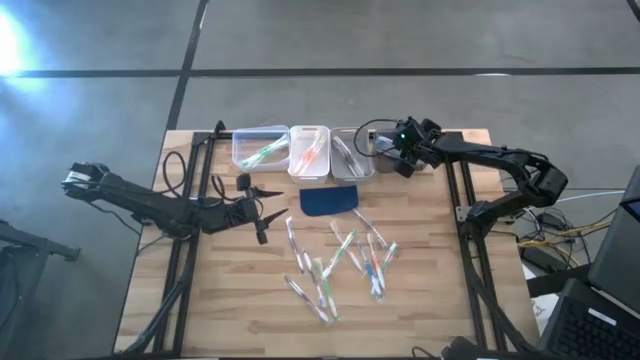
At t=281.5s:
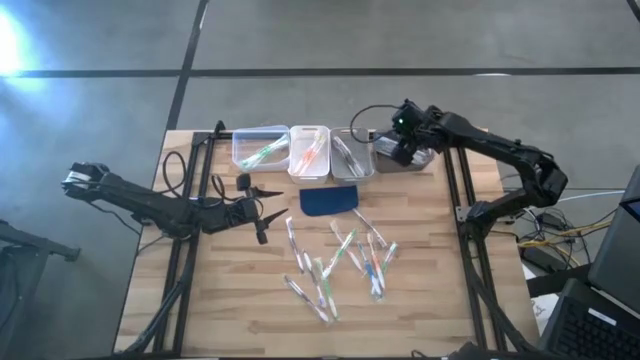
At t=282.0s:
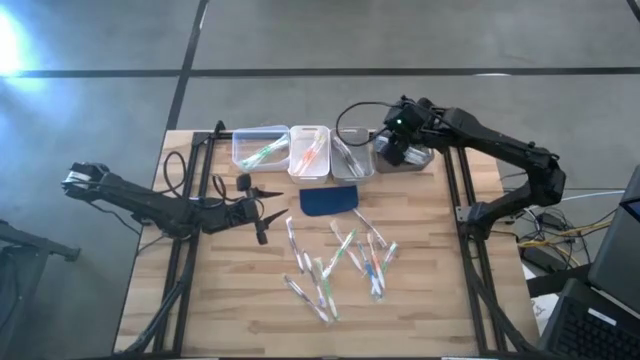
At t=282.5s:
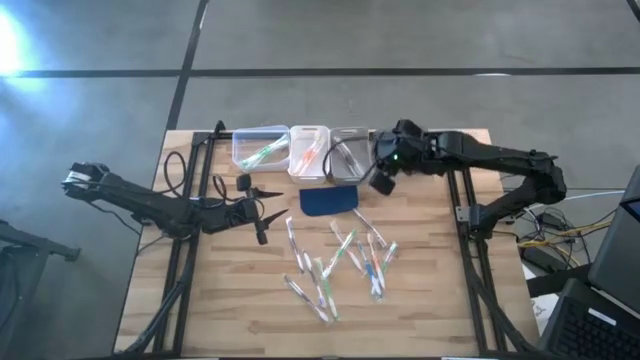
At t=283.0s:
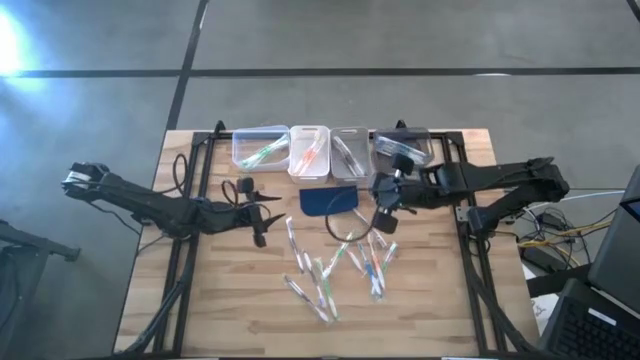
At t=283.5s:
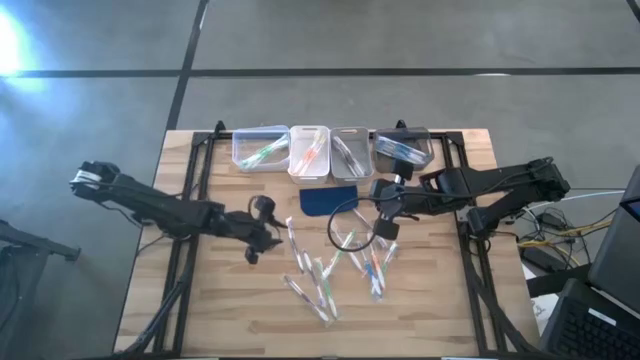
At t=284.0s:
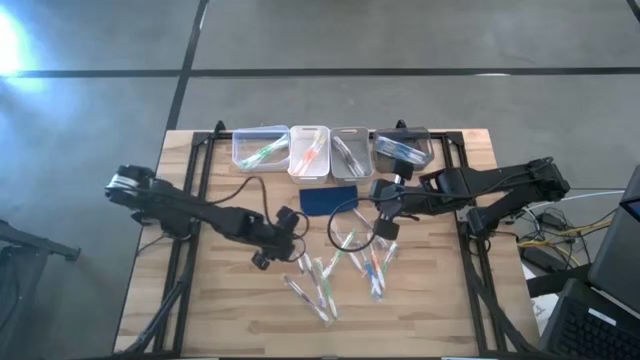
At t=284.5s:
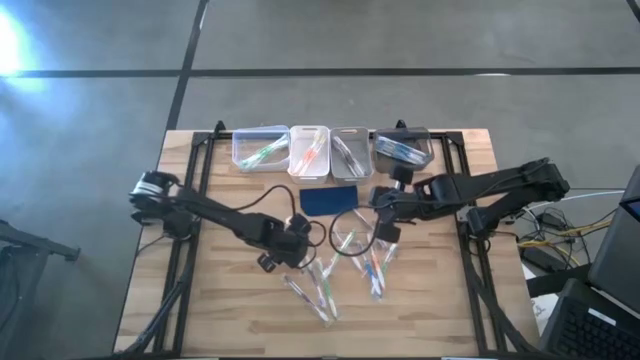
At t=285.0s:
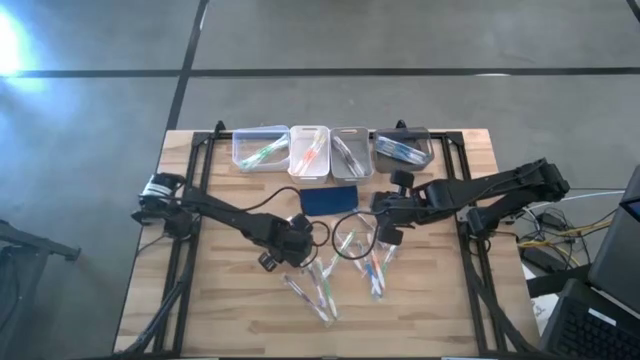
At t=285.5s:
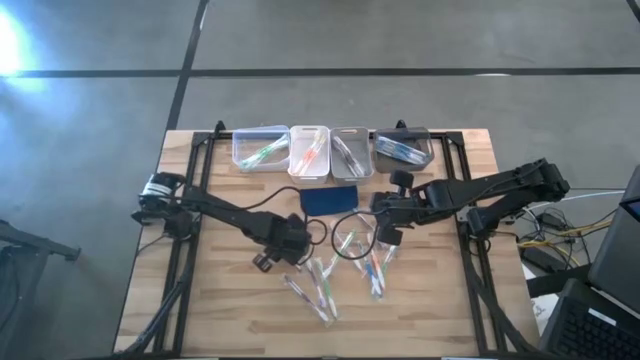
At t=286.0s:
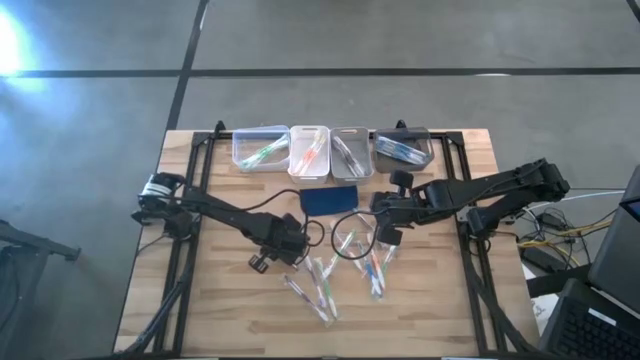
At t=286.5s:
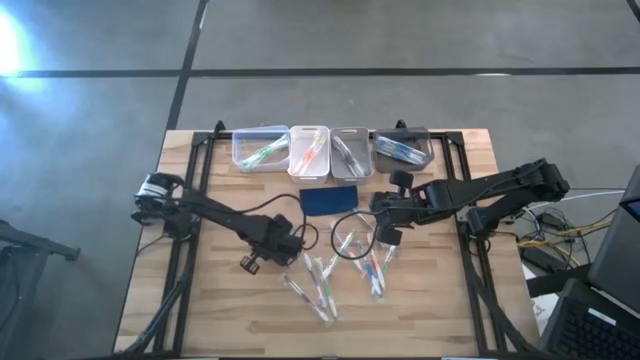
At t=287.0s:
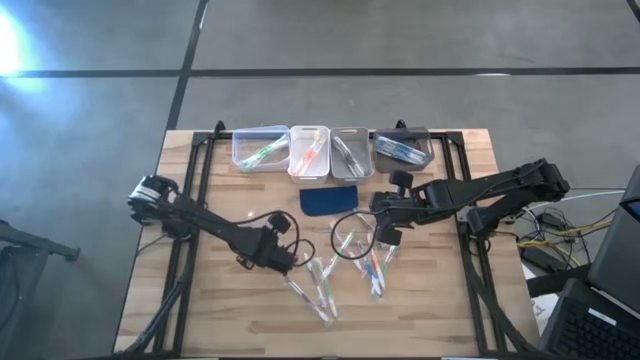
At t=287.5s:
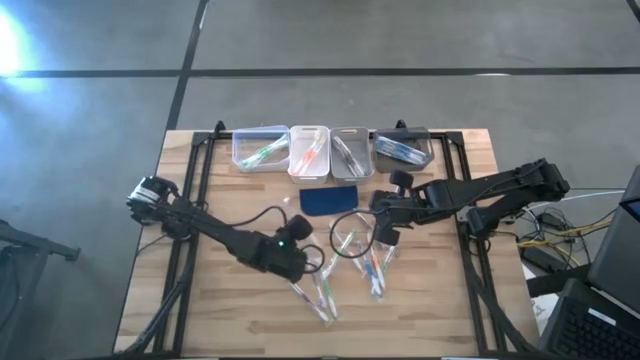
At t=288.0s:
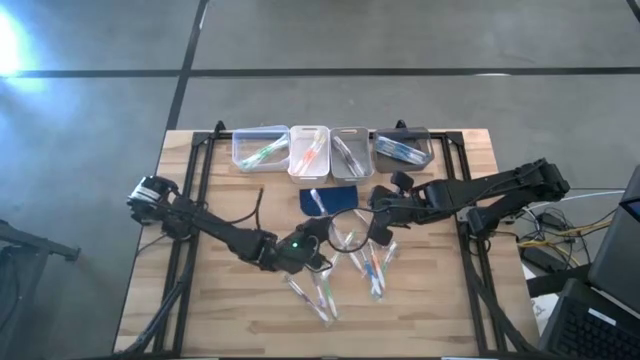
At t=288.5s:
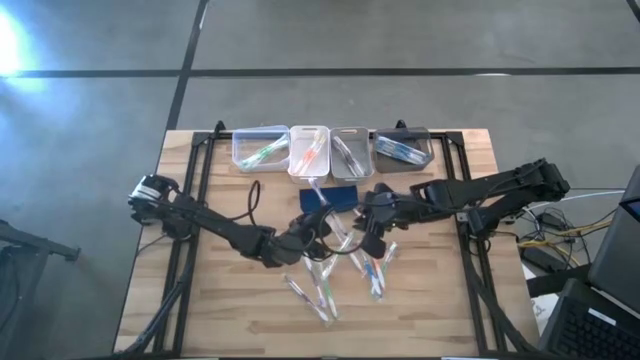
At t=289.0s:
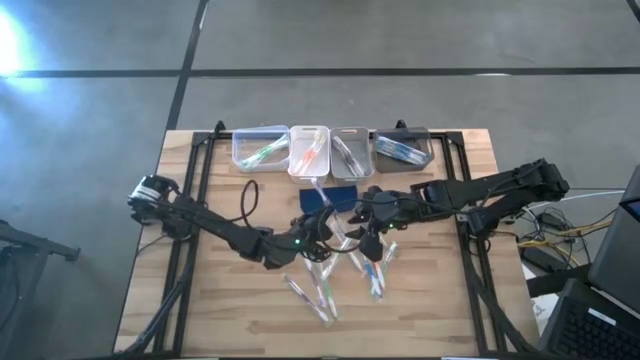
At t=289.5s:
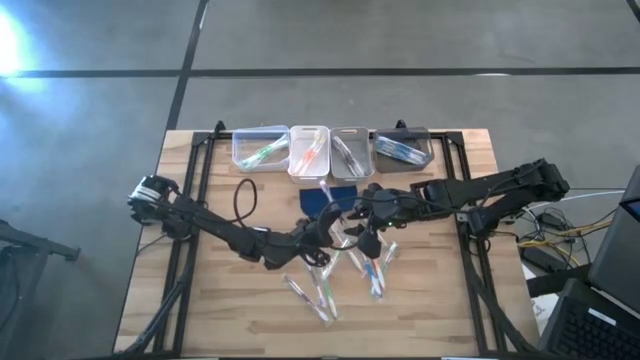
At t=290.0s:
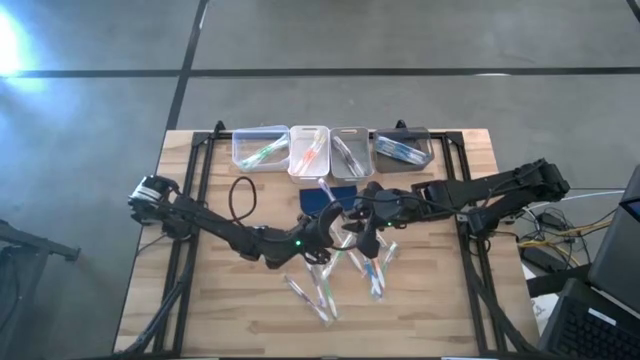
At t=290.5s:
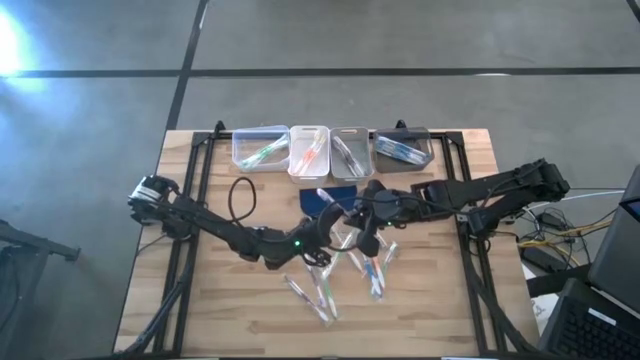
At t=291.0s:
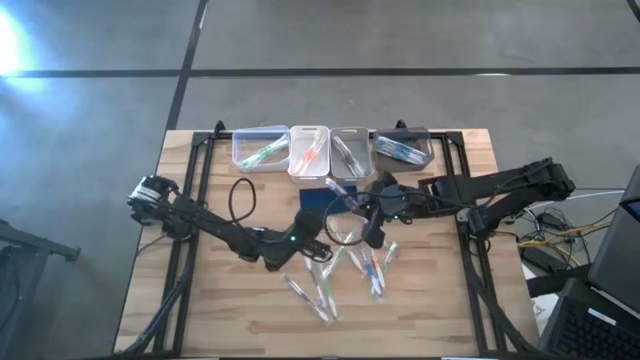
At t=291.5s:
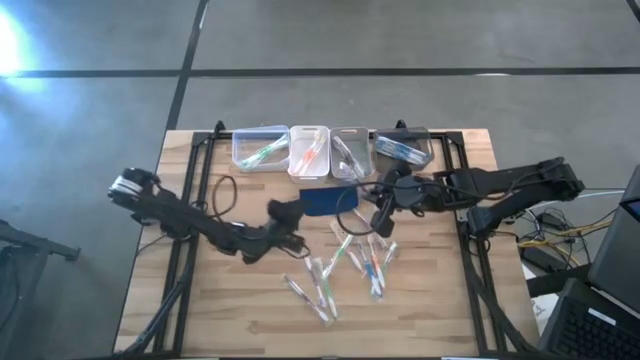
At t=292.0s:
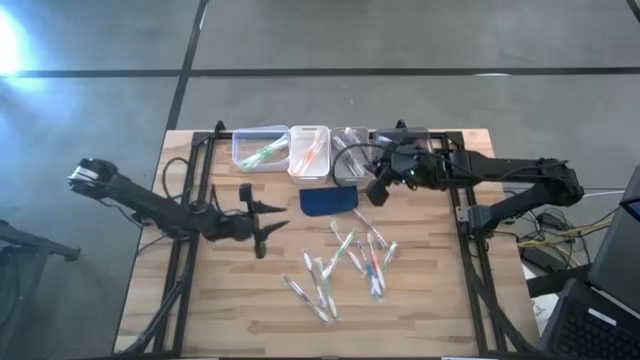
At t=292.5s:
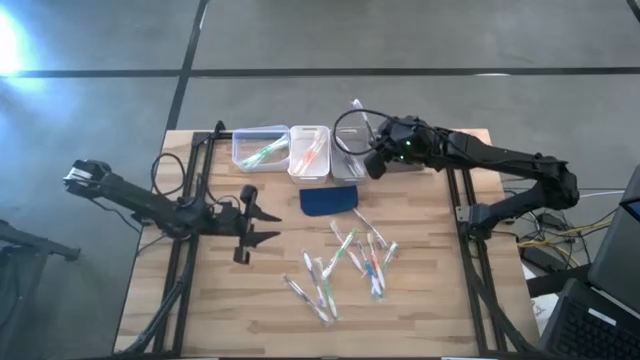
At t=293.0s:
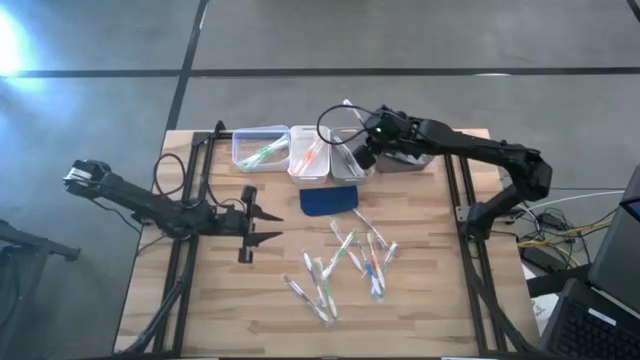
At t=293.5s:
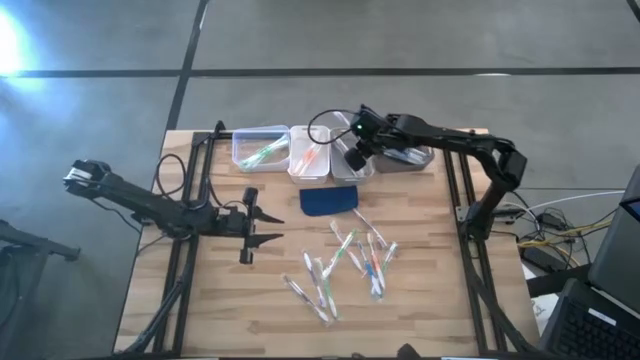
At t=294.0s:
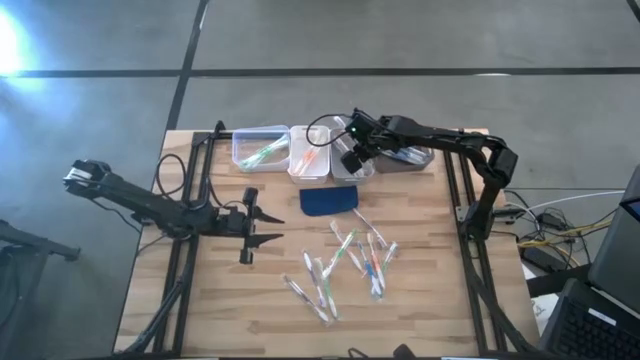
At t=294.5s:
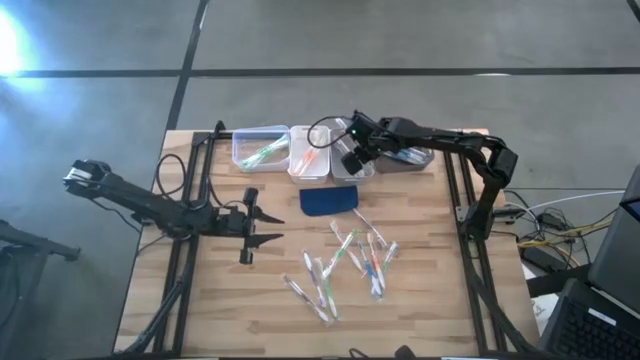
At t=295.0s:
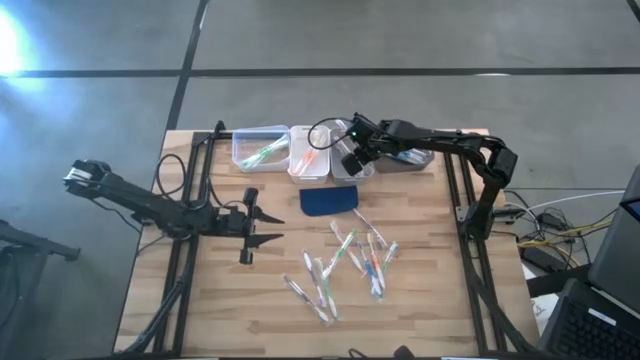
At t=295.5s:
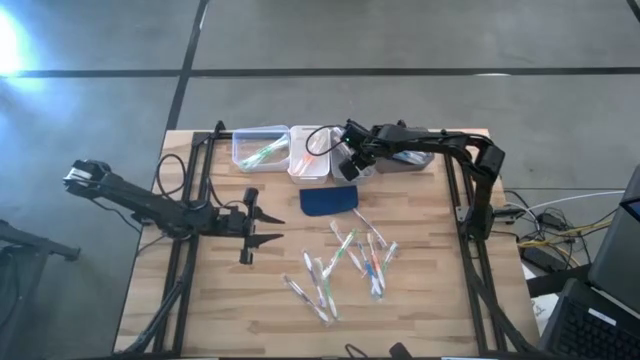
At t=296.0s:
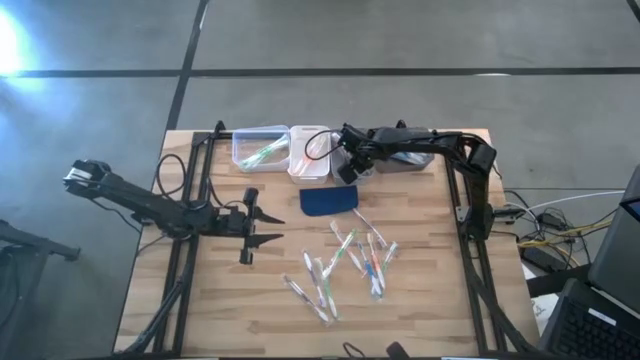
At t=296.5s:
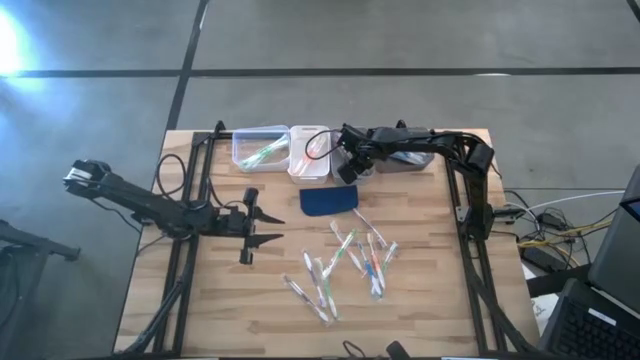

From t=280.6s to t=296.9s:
Task: Pick & Place Toothbrushes
Put the violet toothbrush into the gray bin

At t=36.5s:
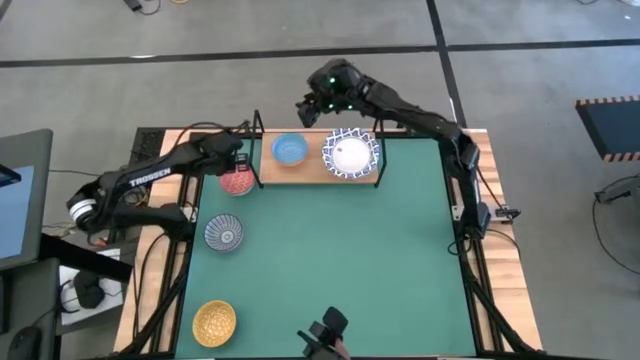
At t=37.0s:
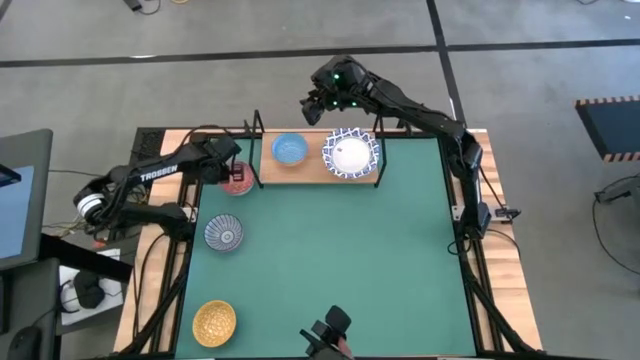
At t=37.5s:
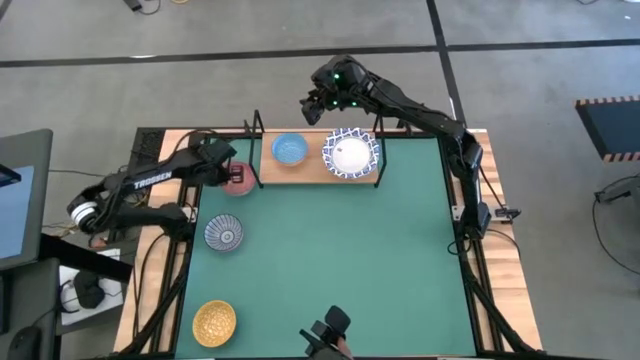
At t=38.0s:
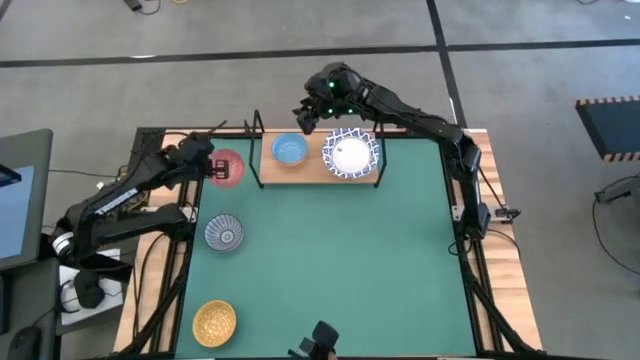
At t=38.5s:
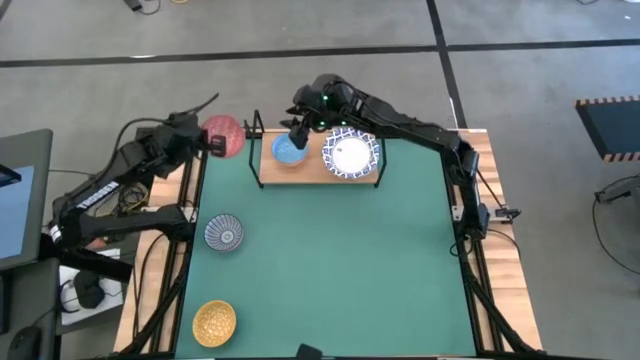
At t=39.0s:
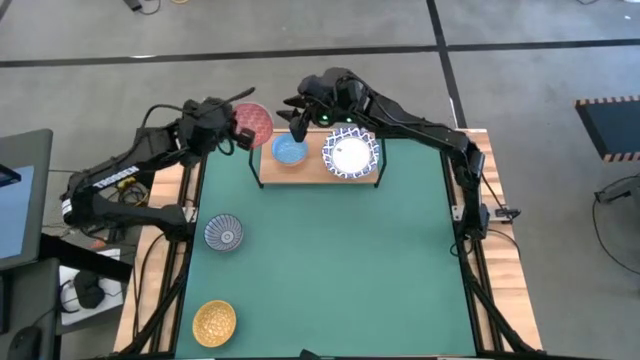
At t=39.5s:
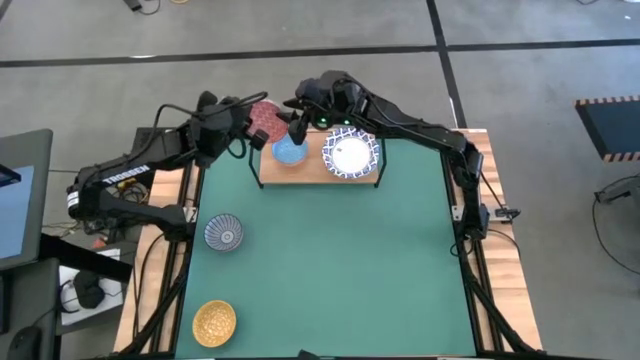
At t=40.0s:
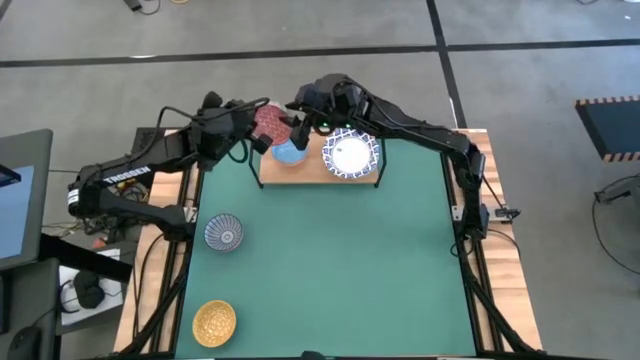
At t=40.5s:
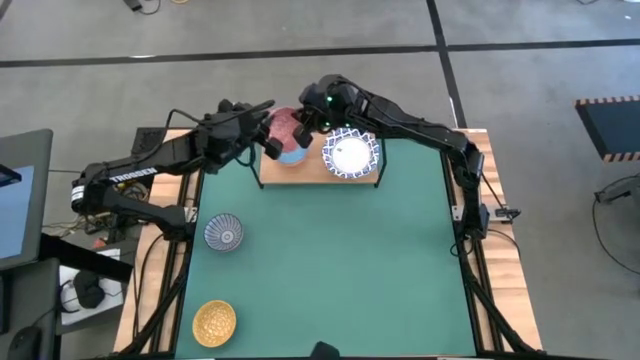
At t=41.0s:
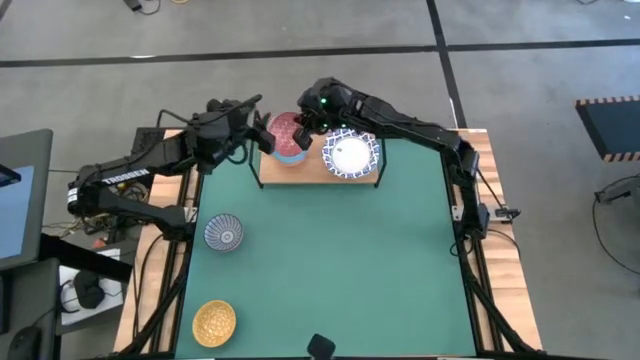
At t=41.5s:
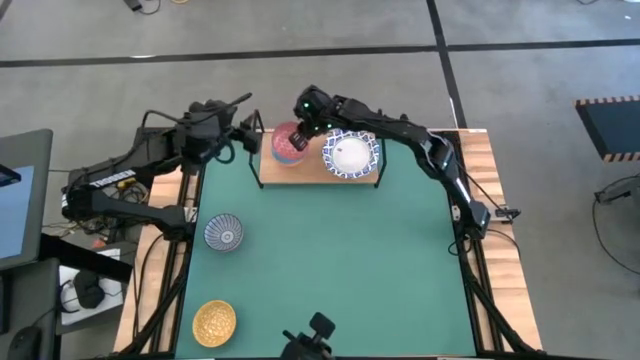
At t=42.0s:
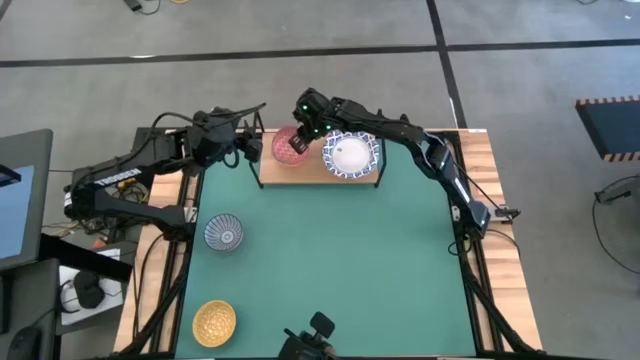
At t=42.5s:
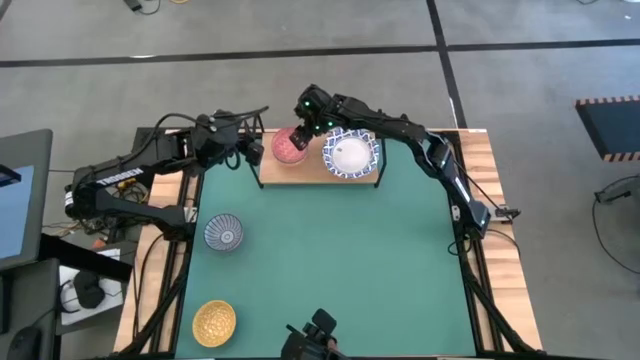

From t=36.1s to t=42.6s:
Task: Place and stack bowls onto a shelf
Stack the red bowl on top of the blue bowl on the shelf
